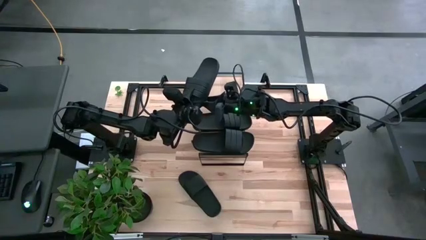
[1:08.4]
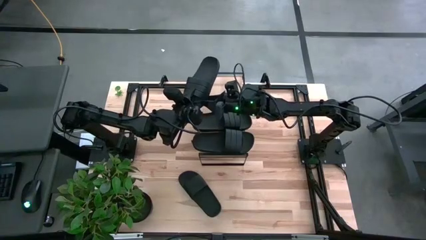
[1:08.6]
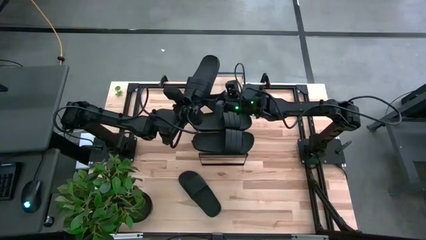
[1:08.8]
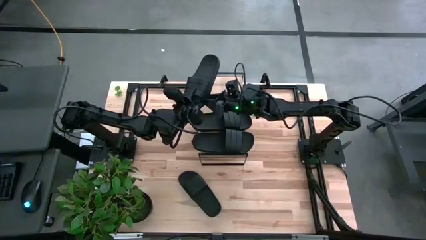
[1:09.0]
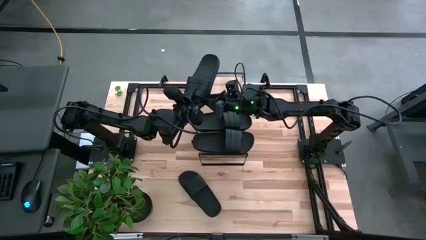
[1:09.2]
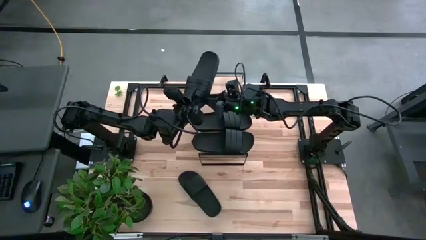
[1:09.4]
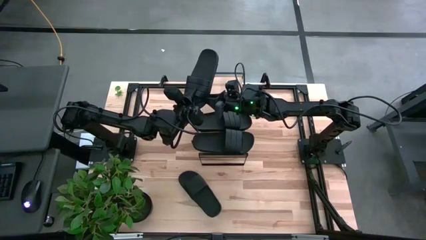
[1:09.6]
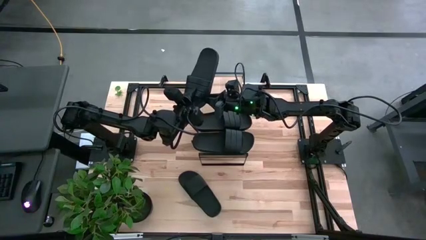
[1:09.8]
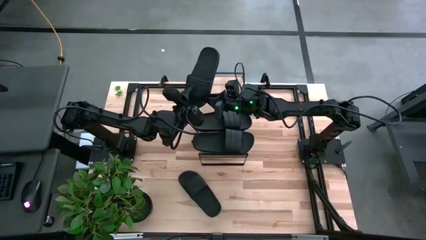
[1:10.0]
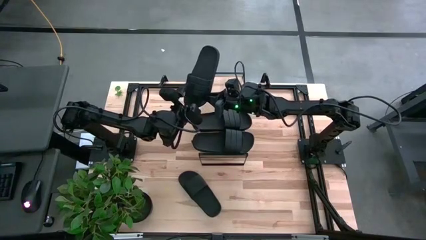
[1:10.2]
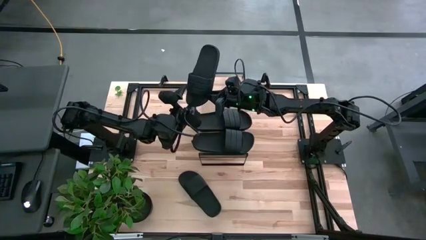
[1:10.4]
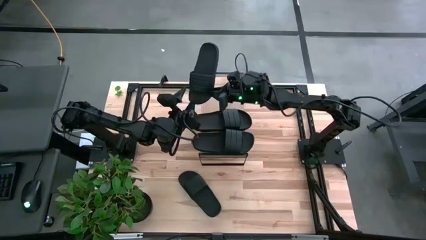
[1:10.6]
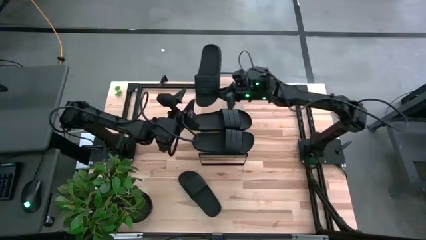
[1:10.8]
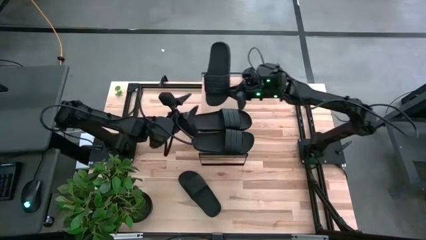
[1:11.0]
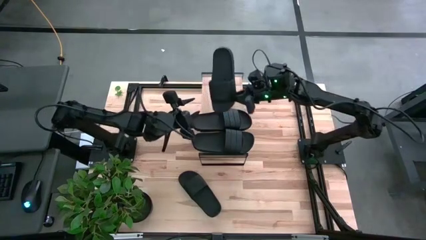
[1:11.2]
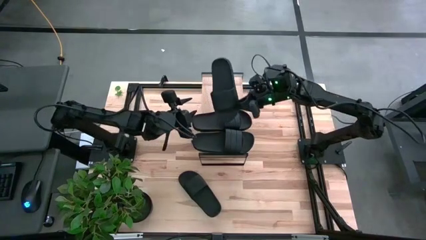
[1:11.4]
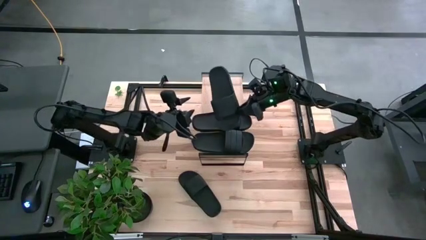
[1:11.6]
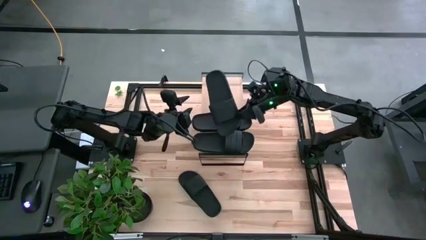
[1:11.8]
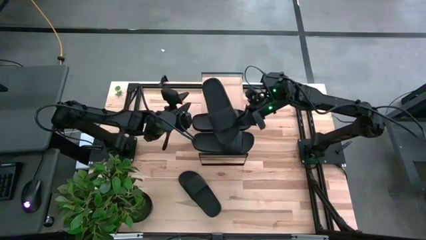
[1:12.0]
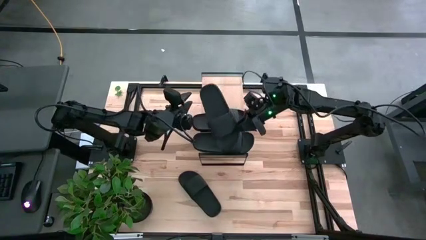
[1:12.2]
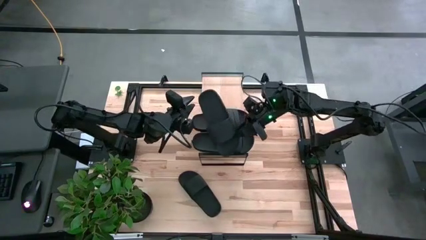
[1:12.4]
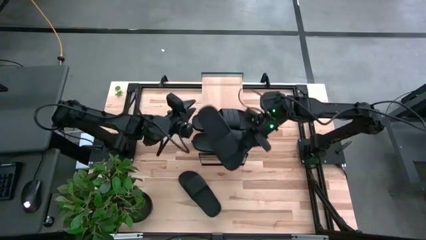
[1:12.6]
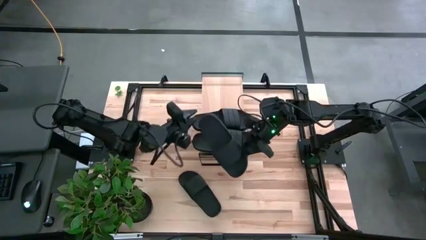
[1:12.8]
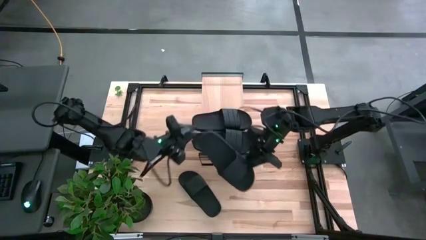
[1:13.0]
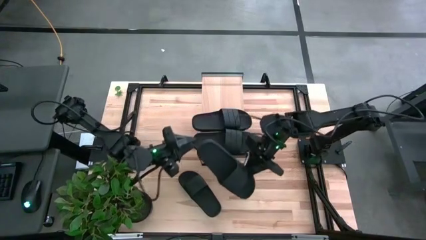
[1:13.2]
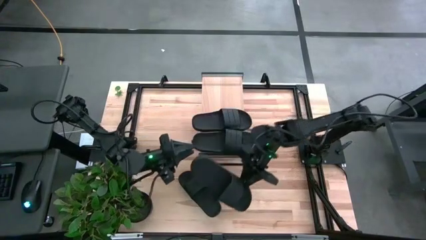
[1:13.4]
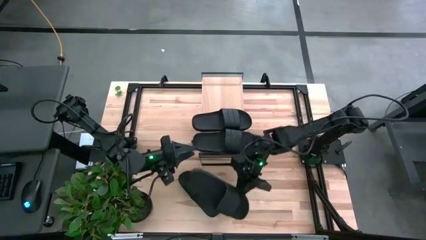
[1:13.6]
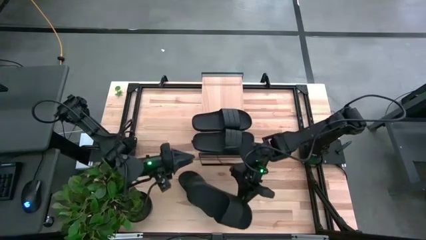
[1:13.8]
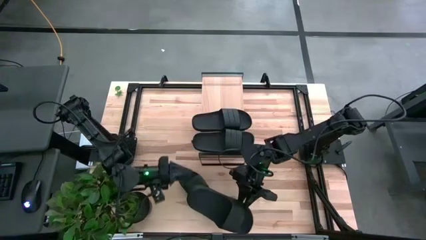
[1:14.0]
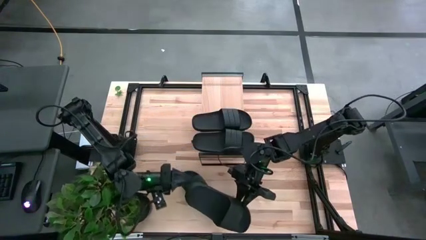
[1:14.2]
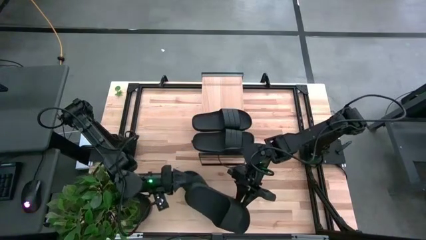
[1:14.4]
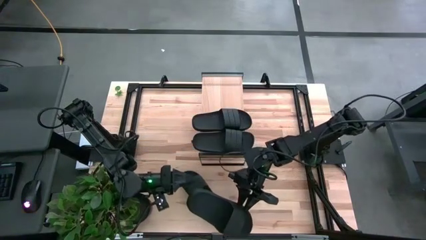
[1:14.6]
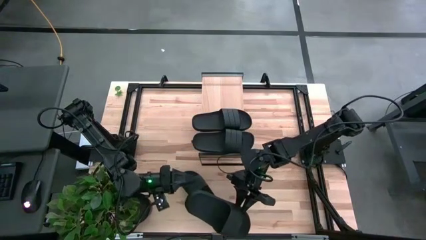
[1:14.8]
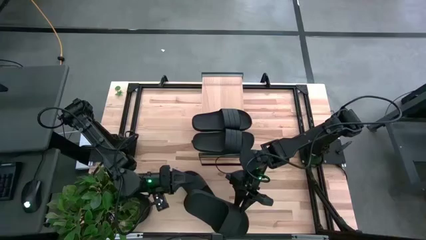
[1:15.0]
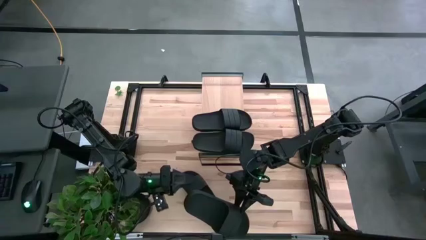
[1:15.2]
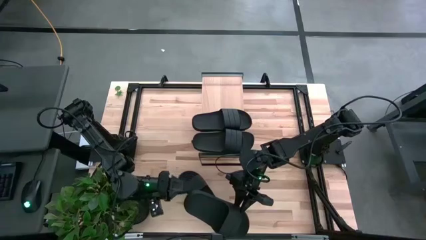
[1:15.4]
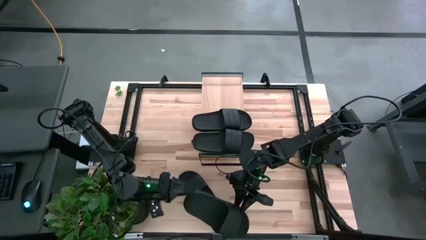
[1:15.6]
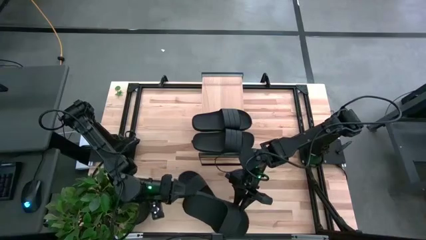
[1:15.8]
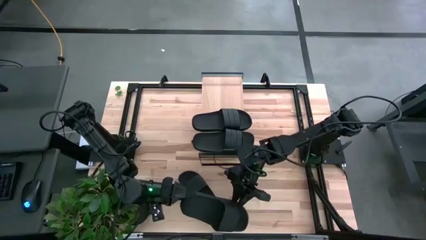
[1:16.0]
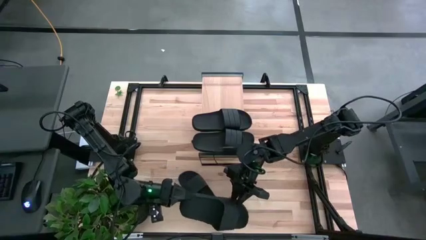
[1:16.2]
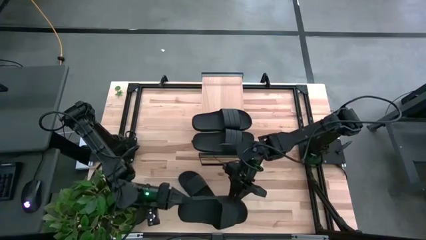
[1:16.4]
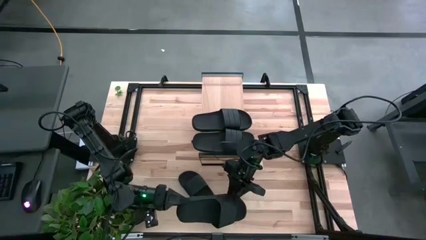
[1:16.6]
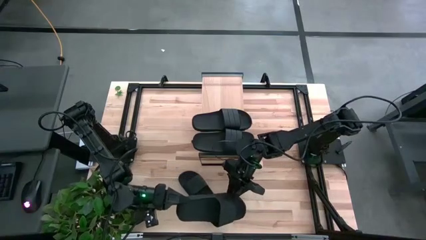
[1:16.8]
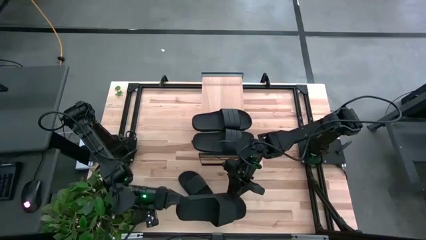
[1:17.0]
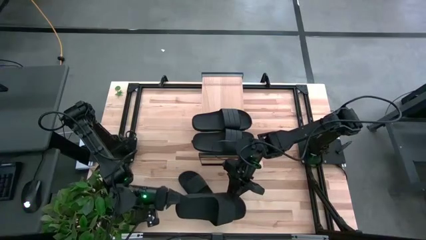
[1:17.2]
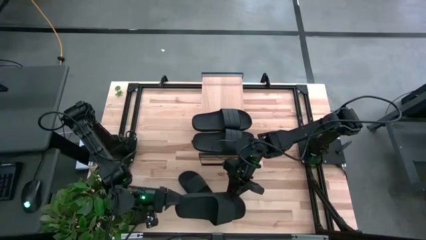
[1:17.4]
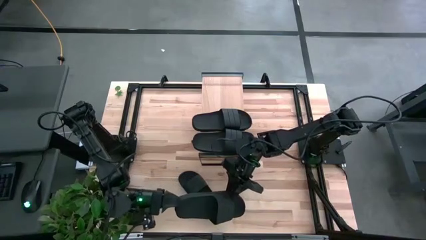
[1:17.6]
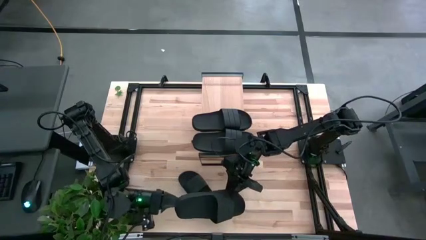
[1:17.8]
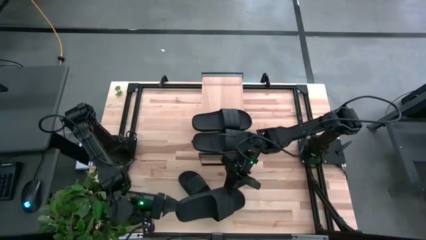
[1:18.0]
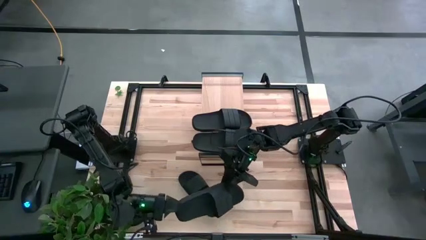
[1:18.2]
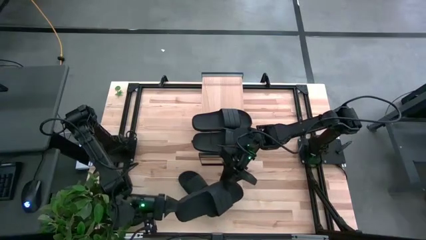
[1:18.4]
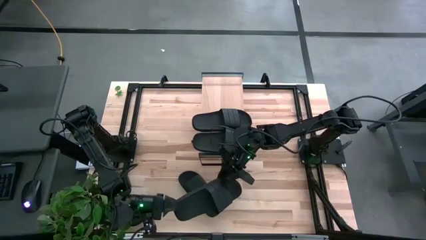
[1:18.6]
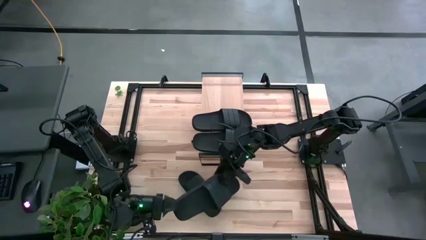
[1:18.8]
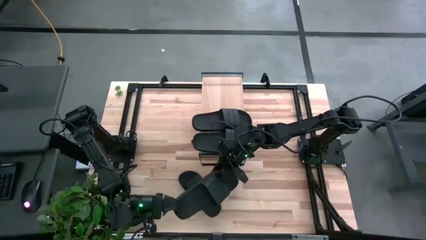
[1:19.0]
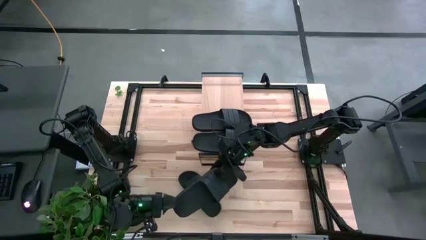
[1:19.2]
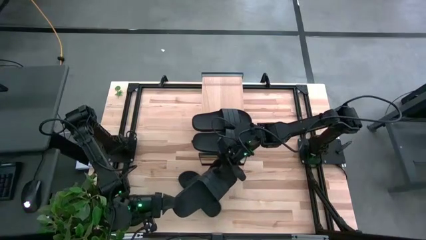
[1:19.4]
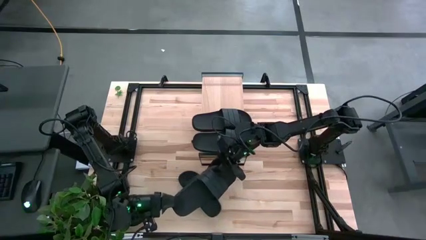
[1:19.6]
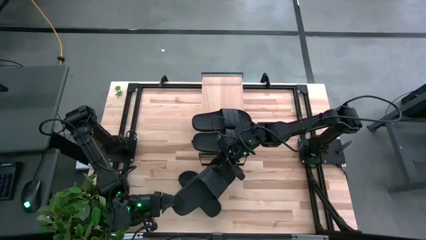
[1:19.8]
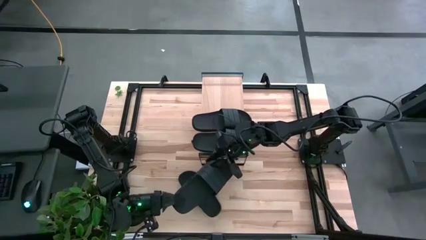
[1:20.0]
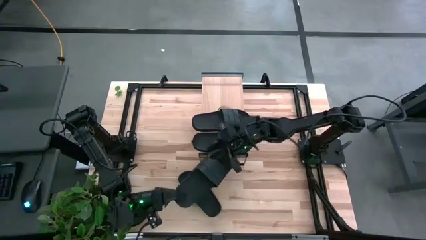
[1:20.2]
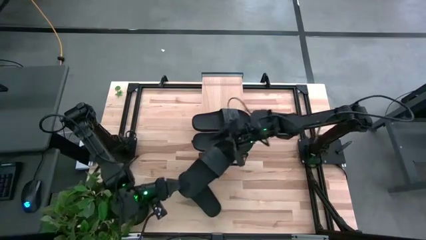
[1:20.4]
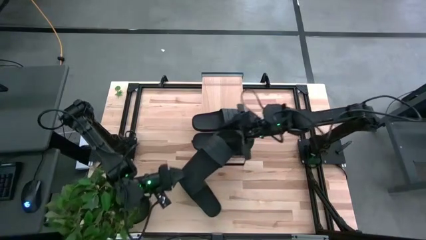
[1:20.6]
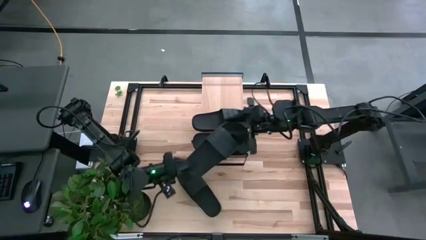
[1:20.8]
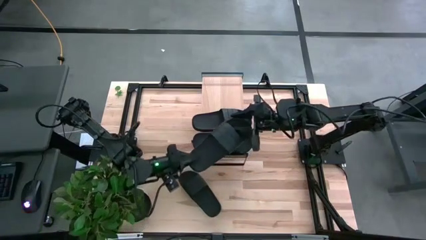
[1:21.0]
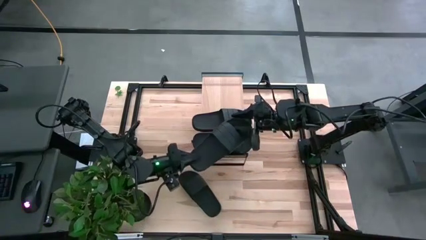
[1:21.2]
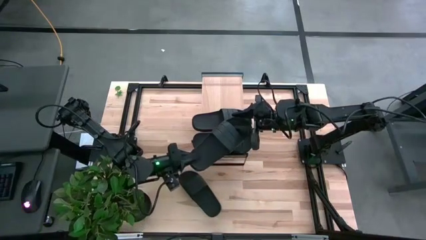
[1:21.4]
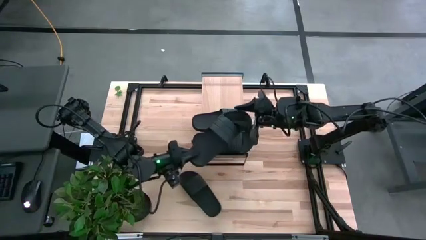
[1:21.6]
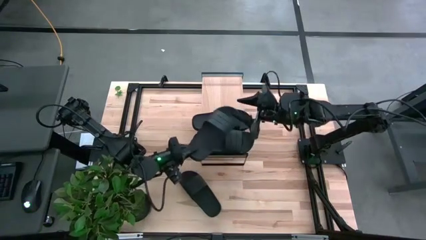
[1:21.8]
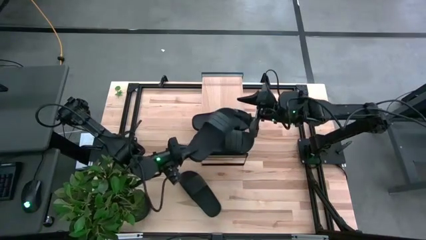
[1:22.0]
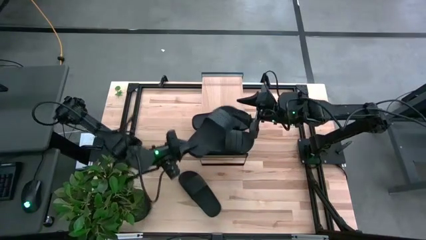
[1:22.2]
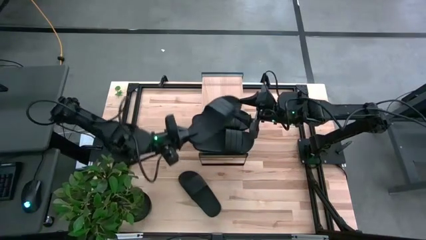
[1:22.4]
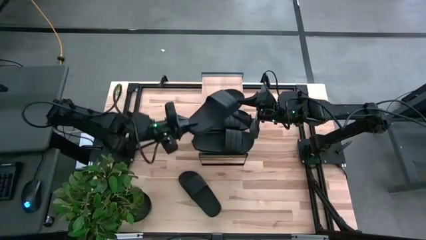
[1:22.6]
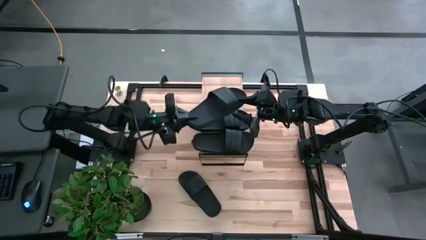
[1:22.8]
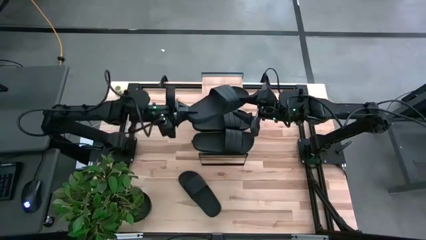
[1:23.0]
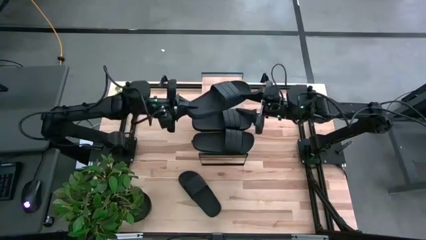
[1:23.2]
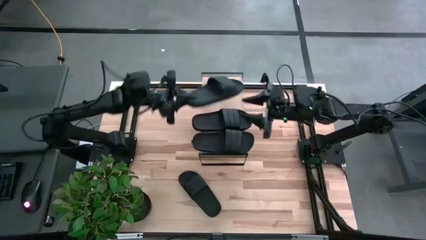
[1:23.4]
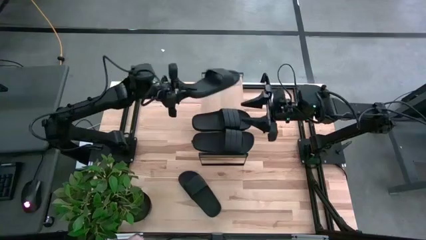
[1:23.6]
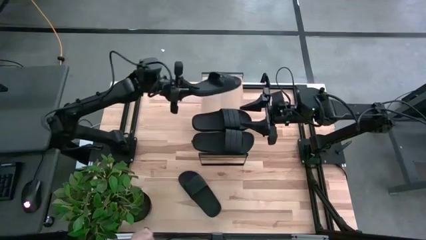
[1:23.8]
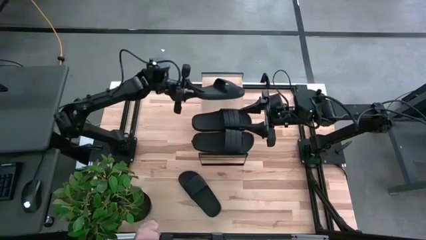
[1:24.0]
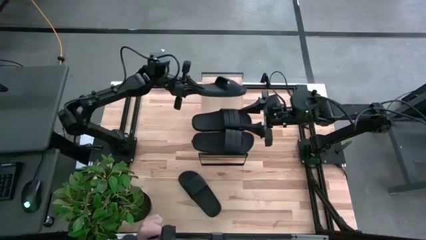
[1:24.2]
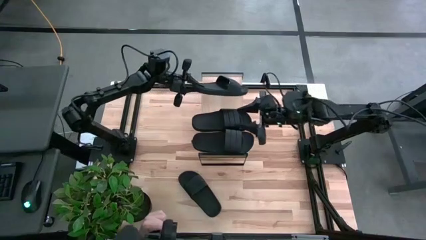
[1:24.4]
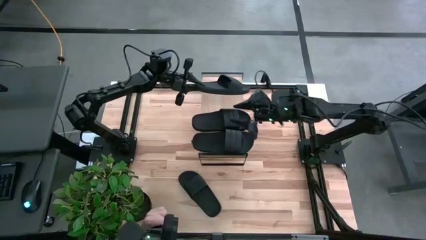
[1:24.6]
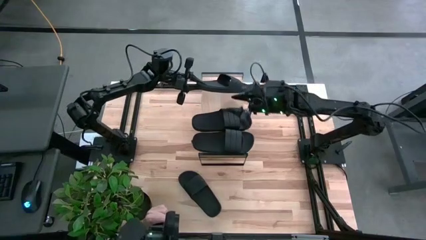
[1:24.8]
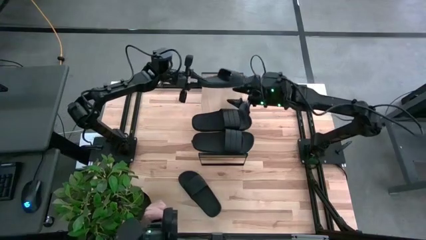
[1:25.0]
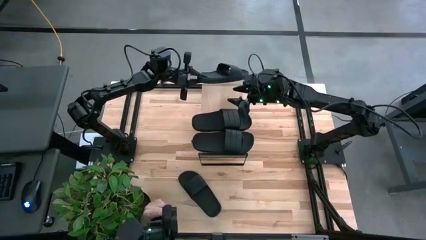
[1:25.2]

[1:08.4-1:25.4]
Task: Pick and place slides into the shelf
Put the black slipper on the shelf
